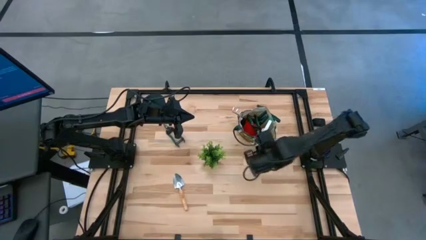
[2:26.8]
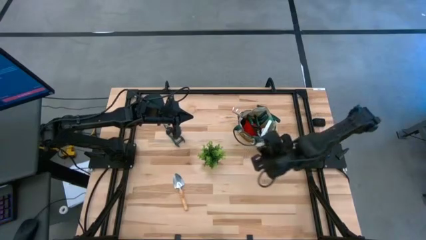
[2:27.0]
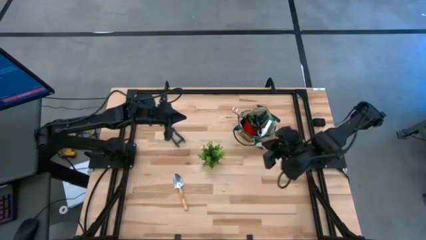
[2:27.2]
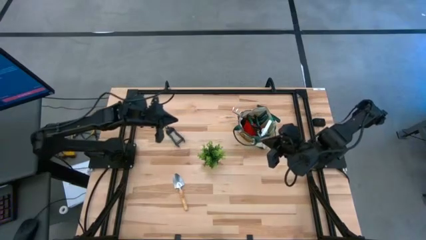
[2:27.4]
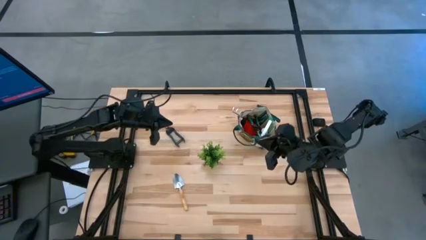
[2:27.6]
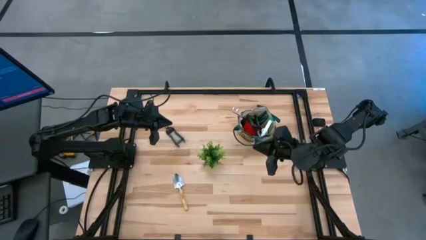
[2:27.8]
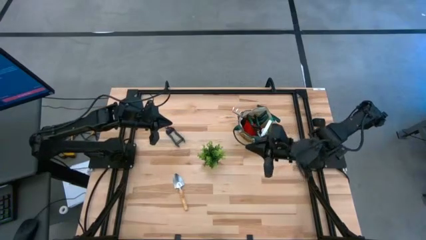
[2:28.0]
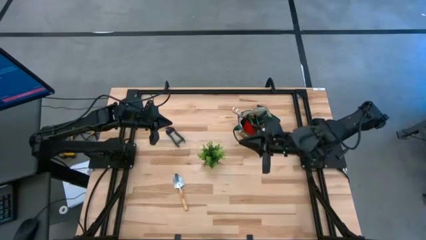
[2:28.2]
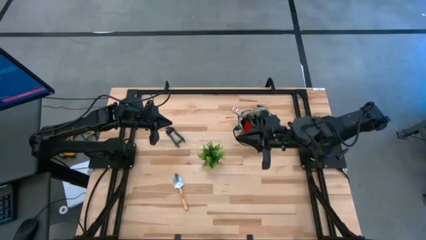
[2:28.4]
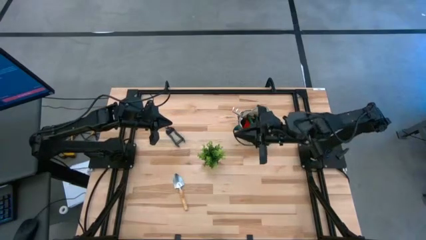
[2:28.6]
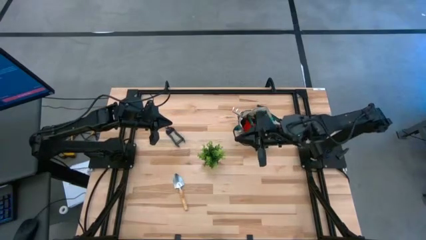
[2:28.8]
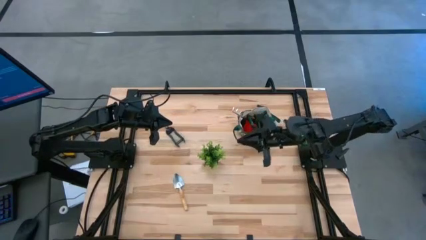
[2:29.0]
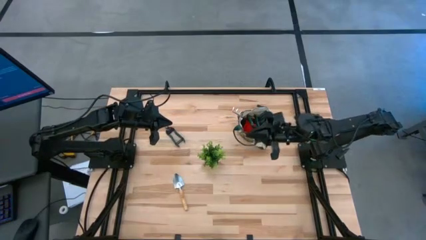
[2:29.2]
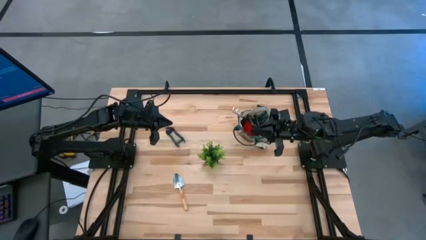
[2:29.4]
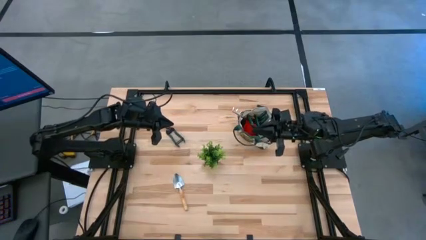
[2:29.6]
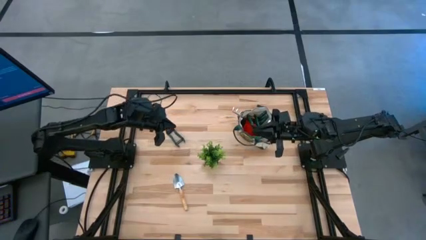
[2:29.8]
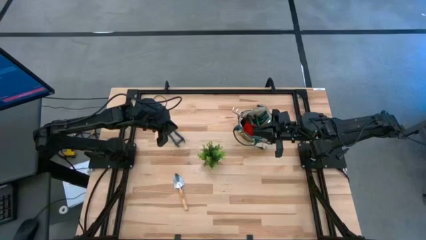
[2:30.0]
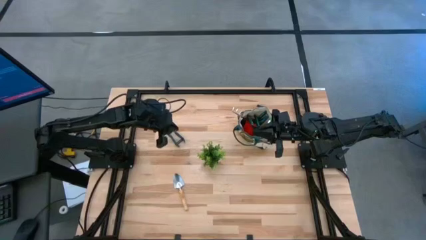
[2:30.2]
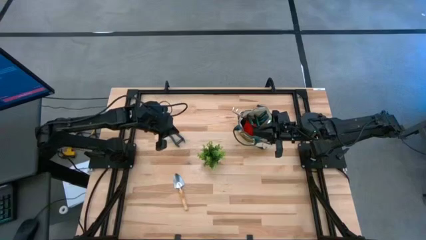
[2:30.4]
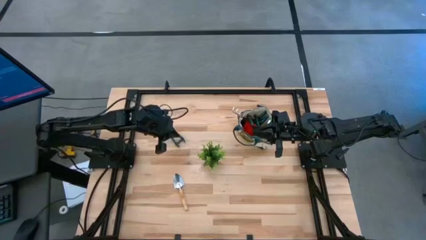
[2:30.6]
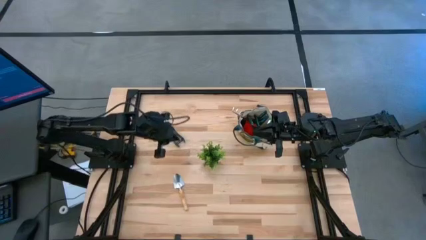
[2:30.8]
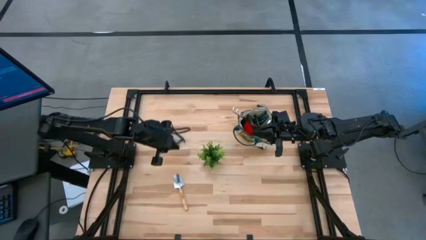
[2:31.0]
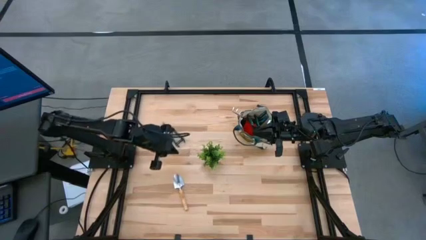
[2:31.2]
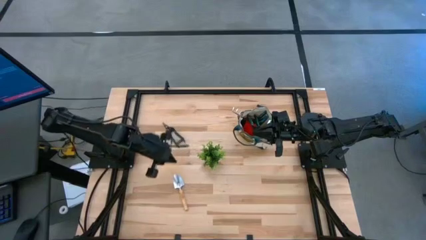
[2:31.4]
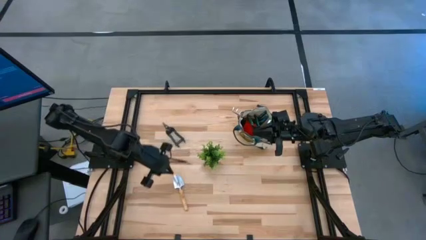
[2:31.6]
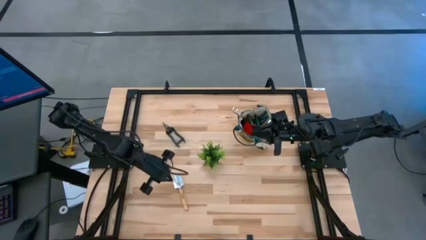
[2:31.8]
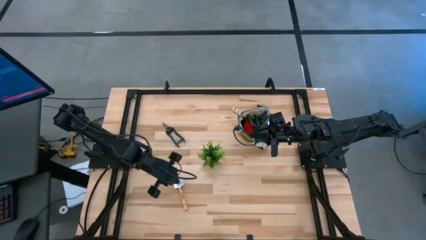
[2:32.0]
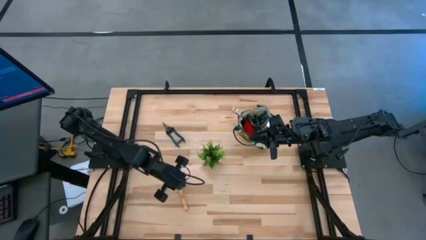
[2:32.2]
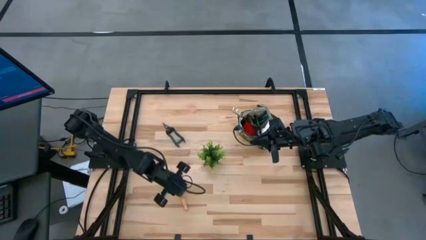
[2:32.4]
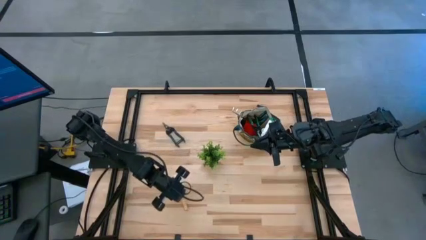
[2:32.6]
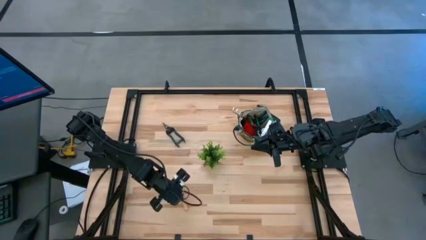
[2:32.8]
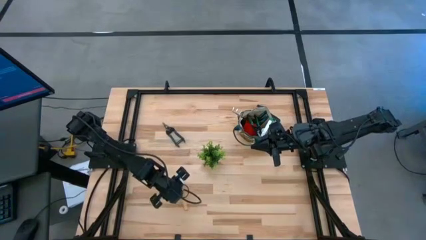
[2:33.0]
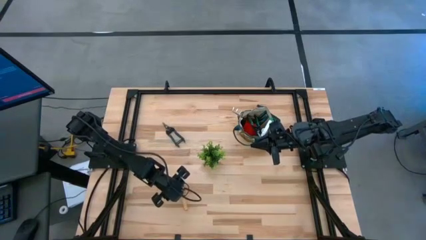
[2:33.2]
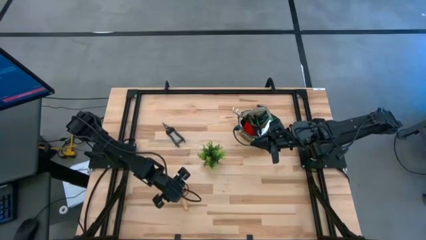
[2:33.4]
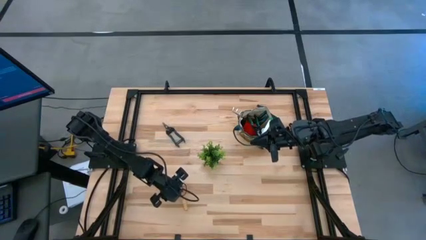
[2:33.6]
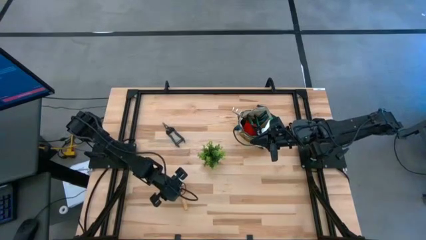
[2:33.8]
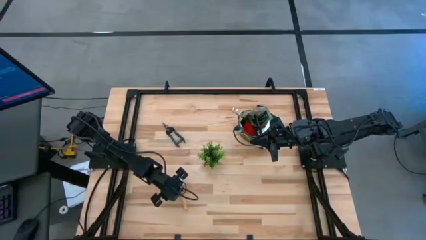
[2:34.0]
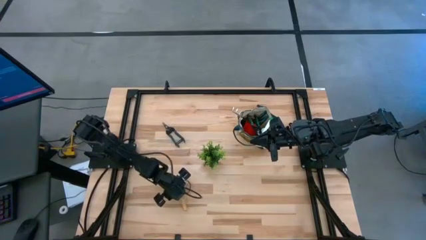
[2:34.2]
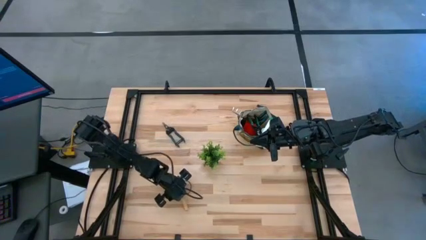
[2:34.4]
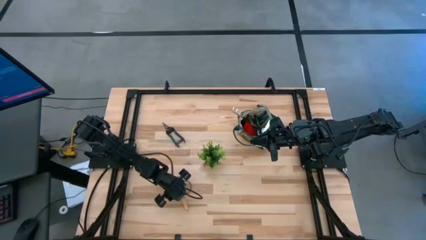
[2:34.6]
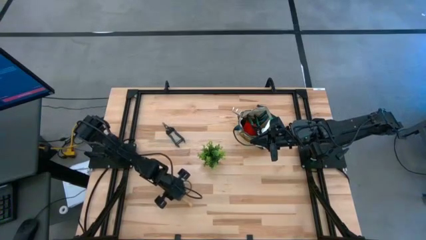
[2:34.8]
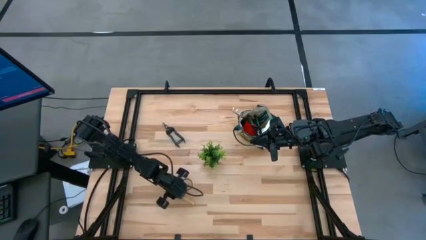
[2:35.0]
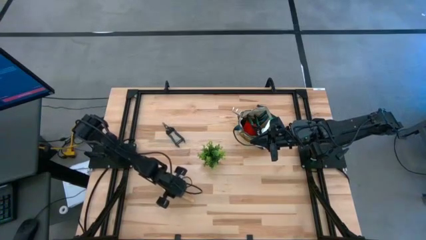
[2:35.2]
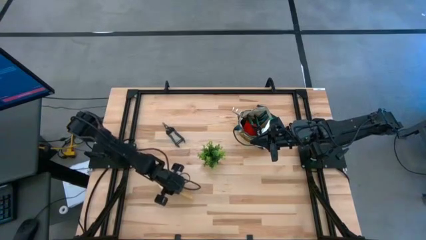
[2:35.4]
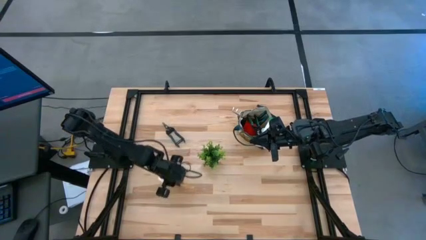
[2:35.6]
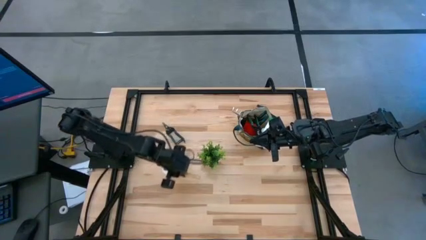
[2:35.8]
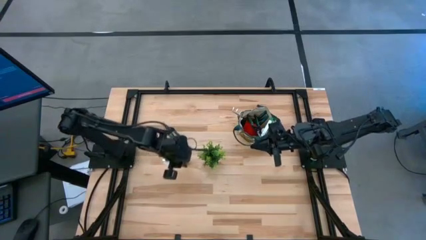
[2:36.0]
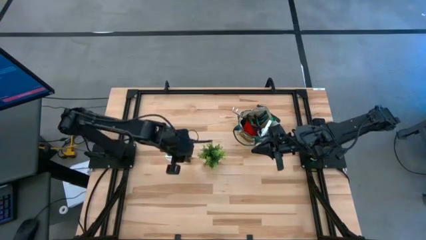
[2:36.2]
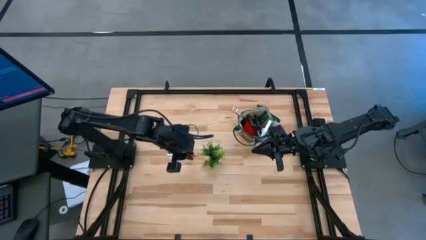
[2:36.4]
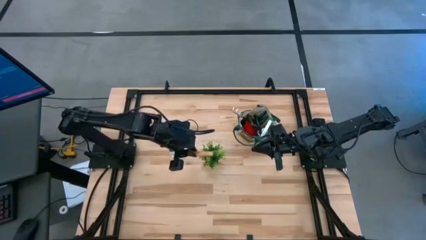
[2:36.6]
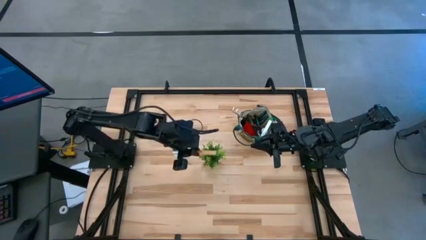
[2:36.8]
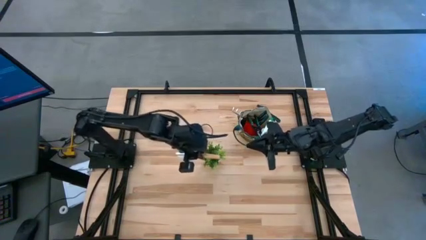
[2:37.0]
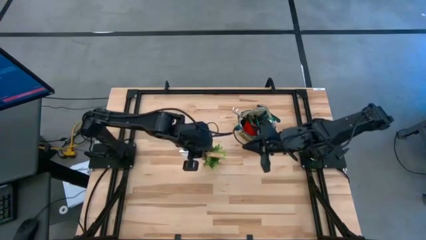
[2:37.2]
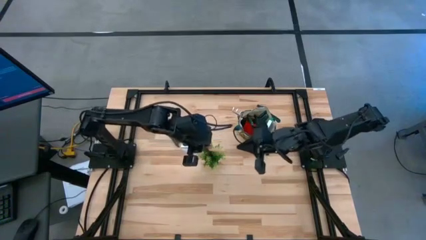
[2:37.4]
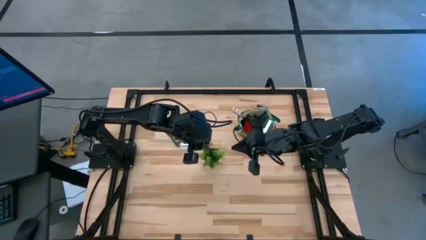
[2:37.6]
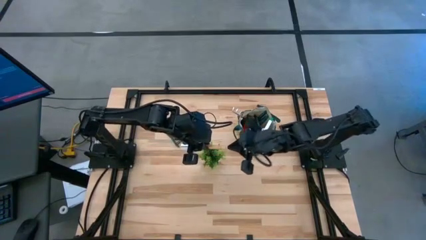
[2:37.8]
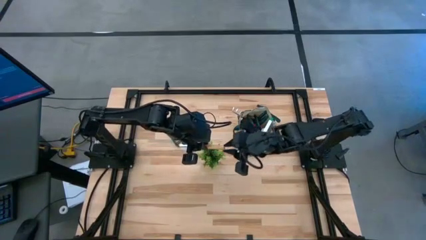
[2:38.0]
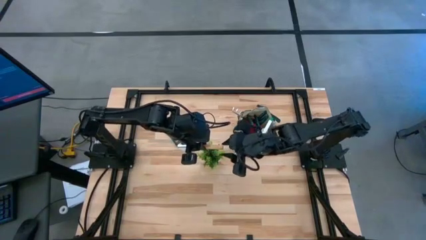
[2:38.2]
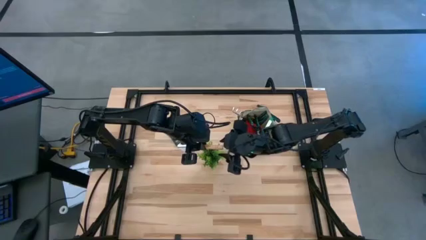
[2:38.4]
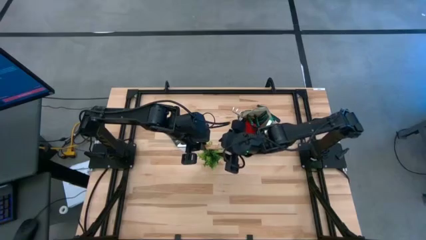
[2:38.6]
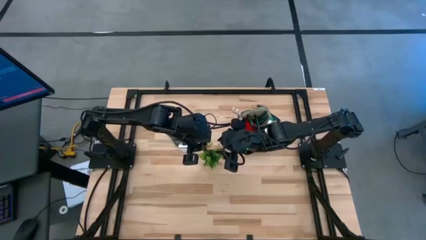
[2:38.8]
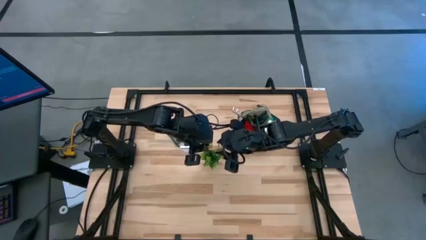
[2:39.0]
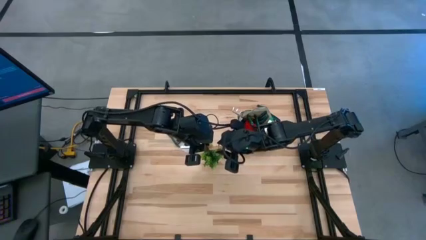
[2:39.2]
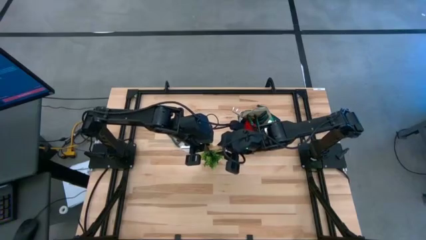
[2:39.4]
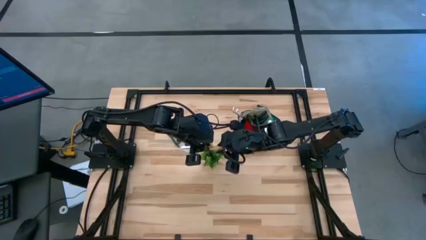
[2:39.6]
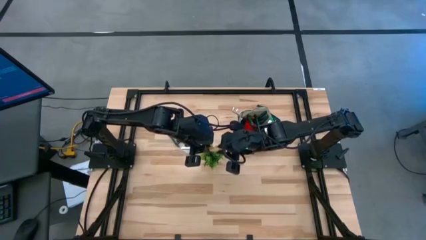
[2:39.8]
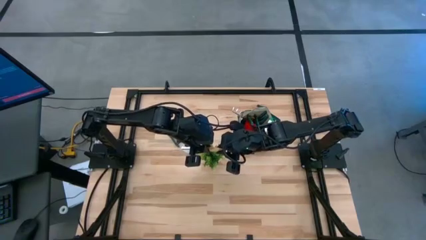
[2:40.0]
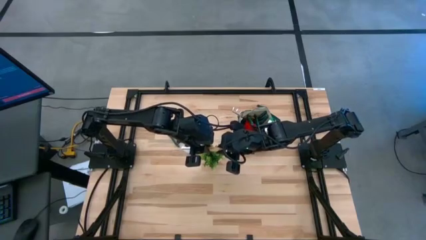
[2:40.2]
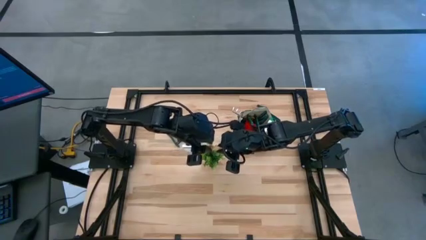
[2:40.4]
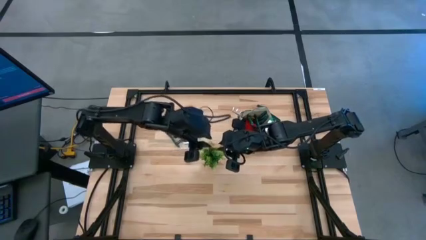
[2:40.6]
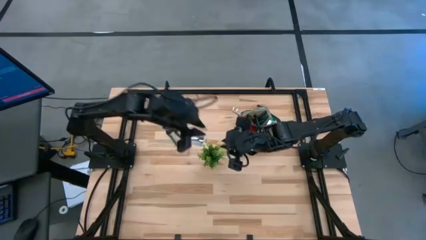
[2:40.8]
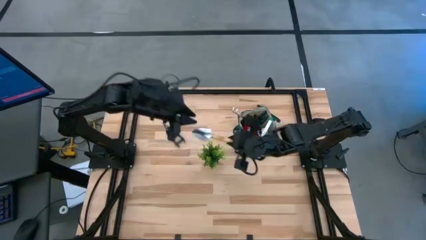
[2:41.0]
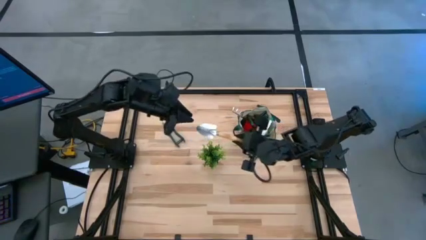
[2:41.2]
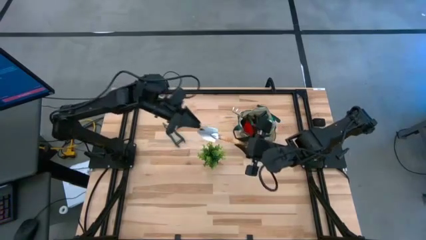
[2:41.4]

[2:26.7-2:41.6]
Task: Pick & Place Garden tools in Gardening bag
Put the brown trowel into the brown gardening bag
